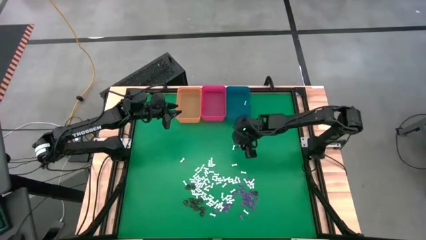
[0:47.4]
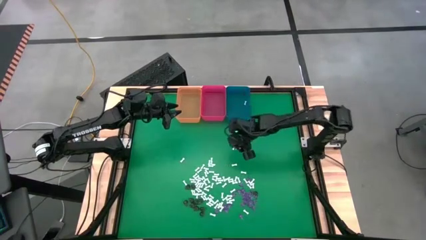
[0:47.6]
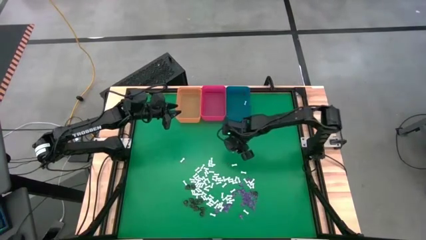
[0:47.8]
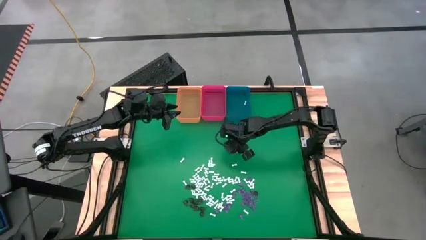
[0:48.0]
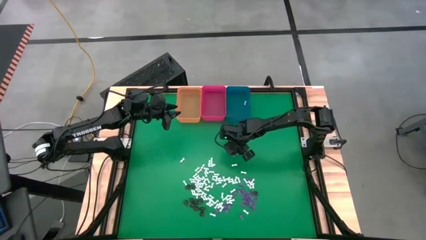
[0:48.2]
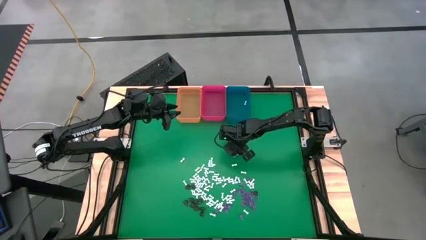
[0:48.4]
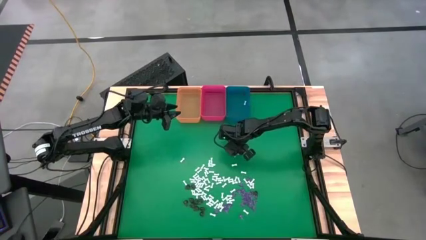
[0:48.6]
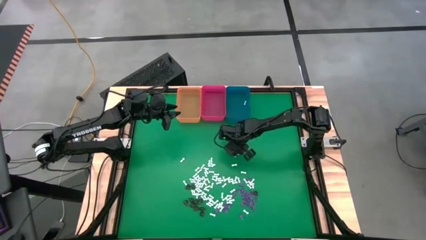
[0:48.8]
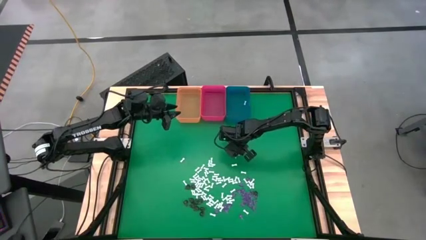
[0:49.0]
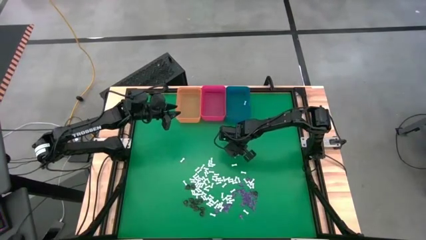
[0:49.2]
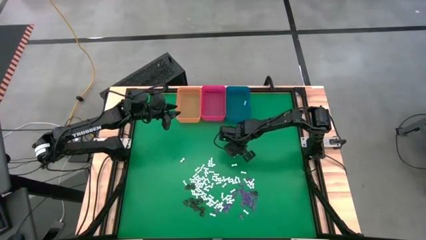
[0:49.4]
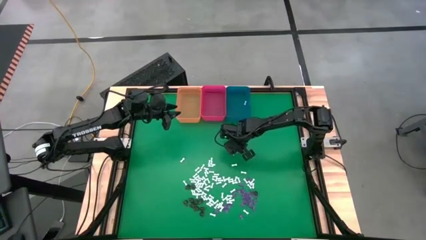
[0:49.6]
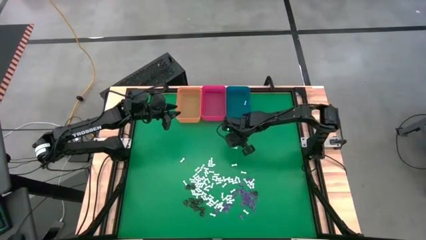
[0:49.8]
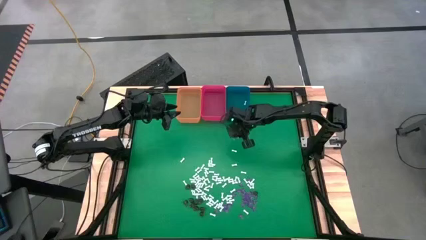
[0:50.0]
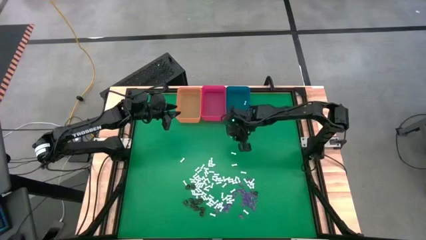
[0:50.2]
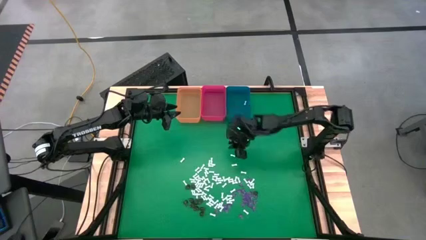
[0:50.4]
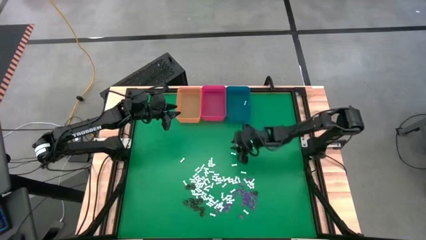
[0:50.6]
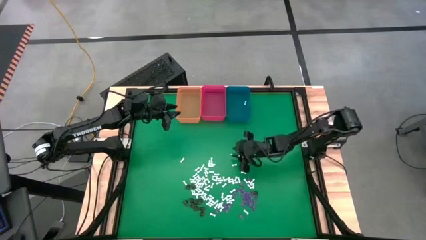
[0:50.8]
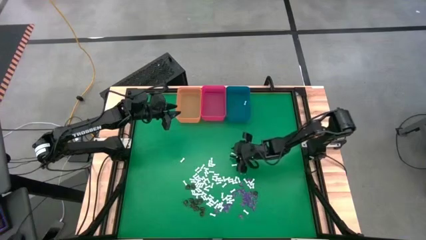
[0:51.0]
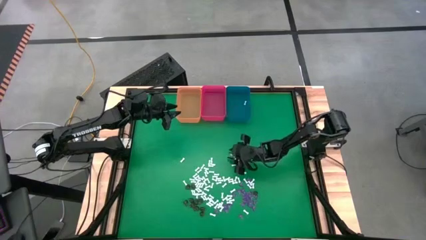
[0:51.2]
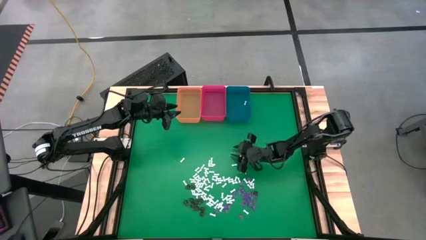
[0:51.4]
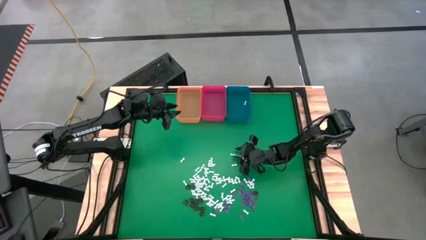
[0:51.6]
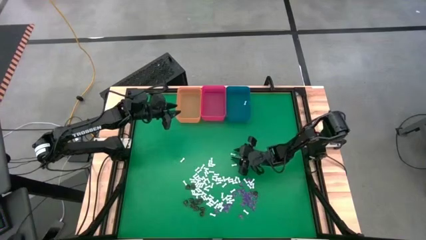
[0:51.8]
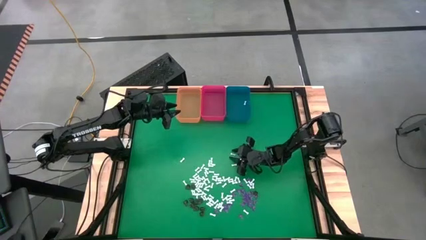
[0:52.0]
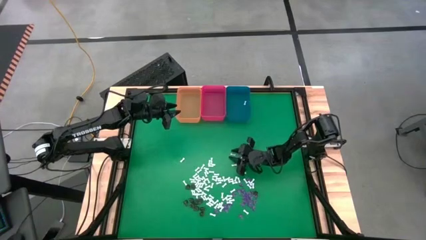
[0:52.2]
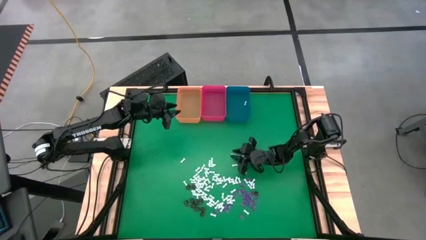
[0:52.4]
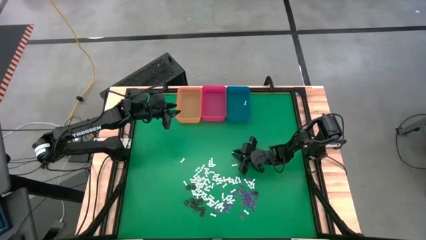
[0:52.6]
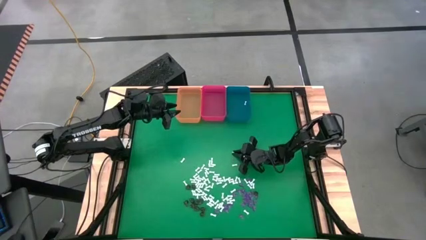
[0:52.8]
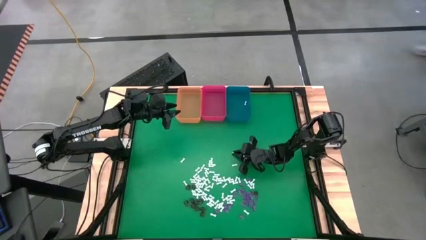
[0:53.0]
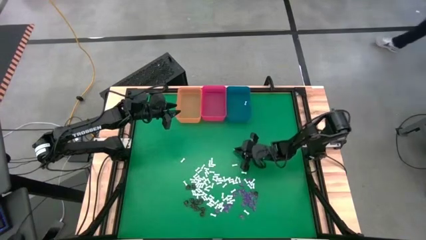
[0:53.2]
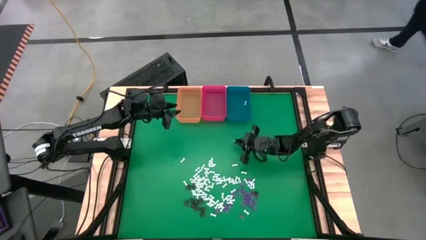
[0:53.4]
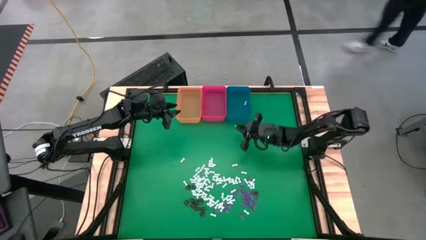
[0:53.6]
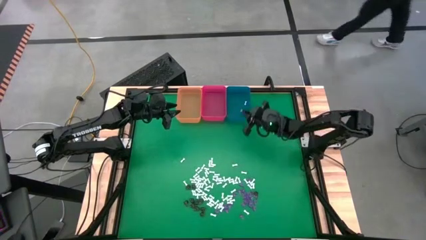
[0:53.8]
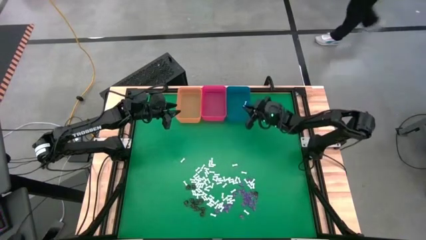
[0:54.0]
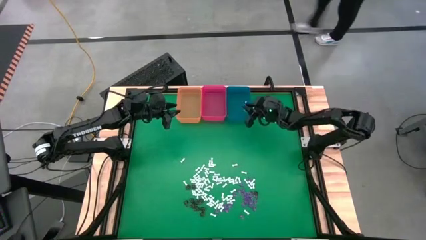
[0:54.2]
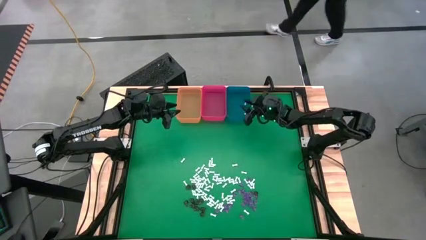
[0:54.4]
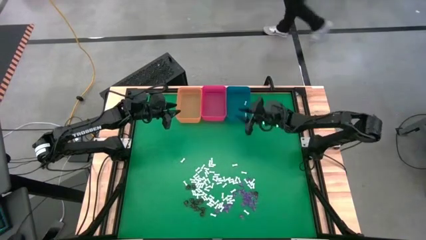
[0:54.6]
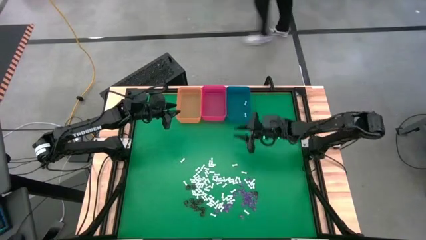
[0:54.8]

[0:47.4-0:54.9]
Task: Sort Halloween decoration
Put the white bone toy into the blue bin

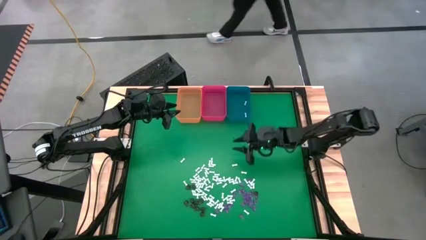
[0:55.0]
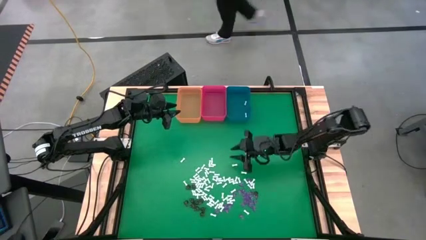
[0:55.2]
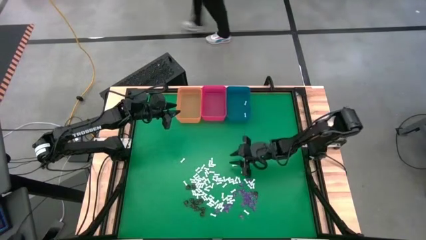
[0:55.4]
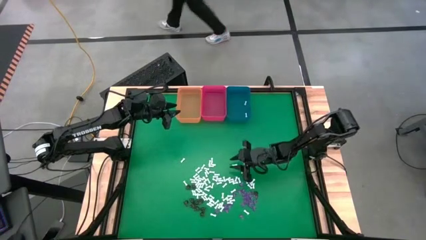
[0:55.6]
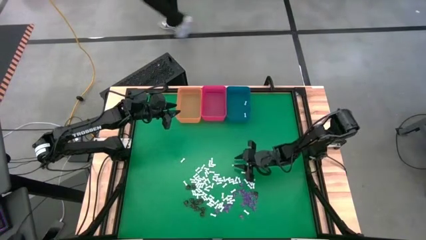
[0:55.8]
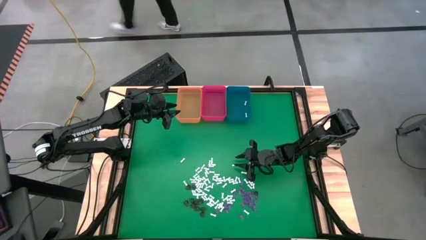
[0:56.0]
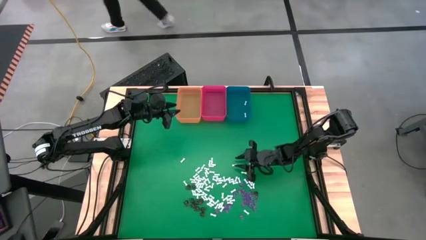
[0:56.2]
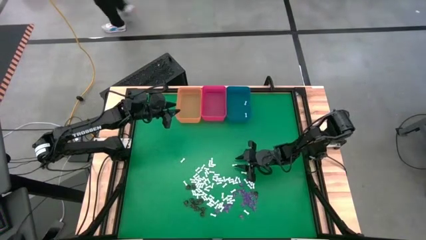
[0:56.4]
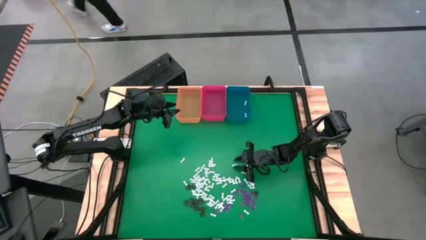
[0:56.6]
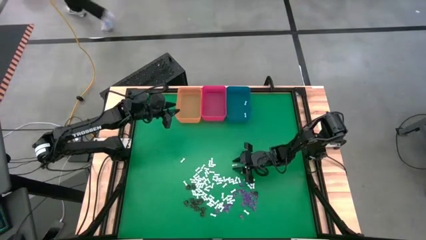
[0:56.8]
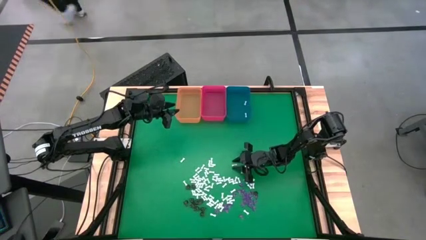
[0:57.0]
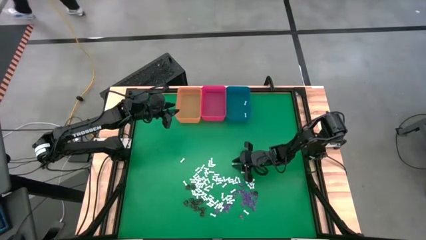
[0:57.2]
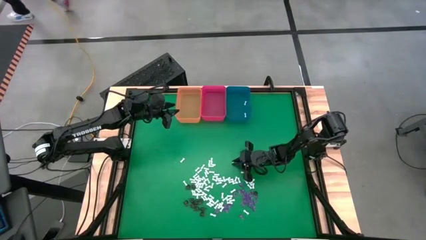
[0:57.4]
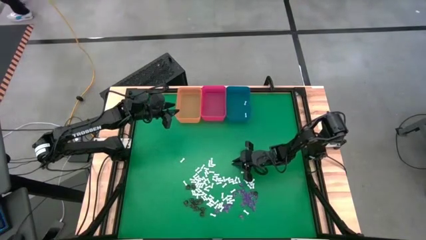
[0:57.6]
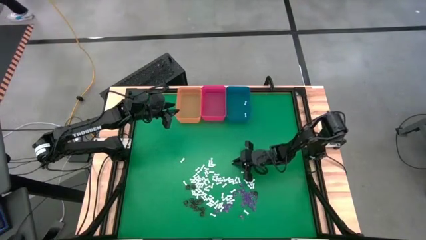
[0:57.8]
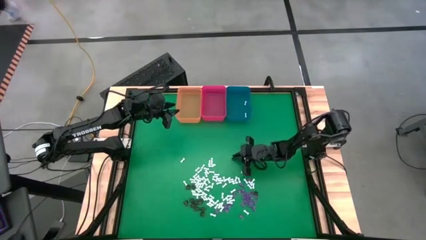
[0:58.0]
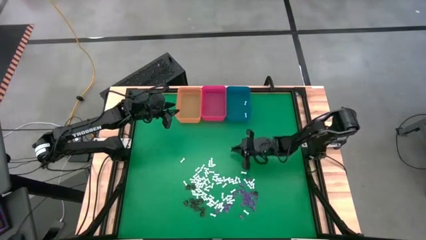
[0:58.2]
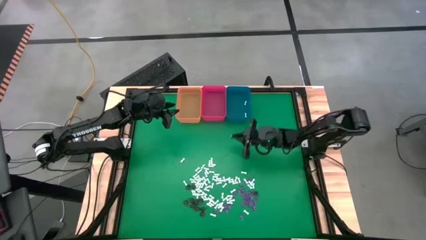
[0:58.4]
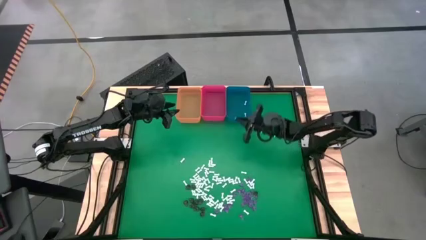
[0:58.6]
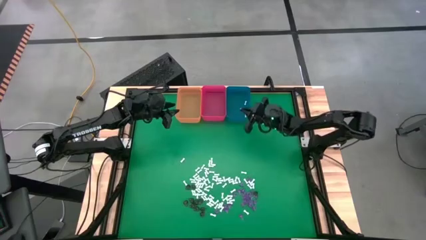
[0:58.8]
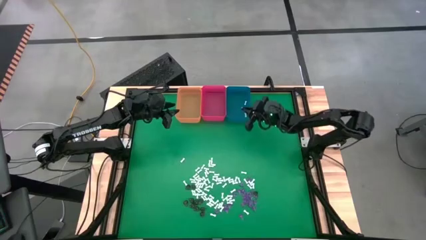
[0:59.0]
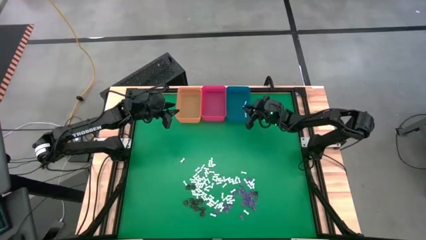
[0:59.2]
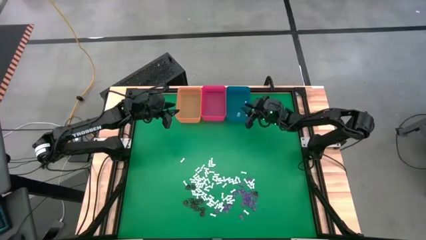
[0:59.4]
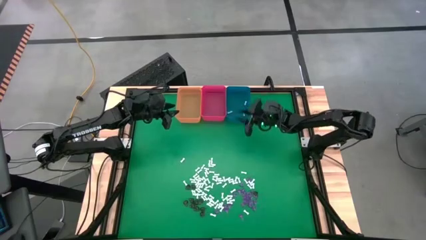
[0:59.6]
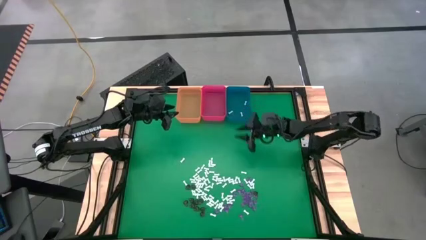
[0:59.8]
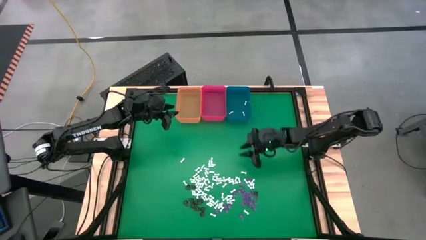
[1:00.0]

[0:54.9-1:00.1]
Put the white bone toy into the blue bin

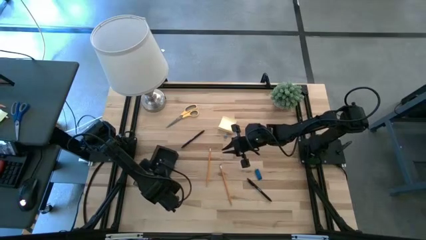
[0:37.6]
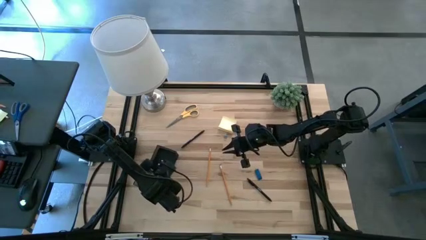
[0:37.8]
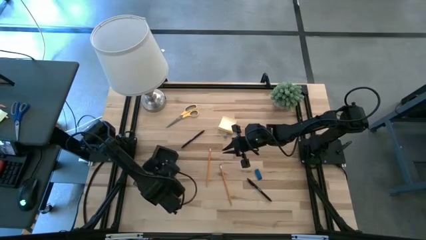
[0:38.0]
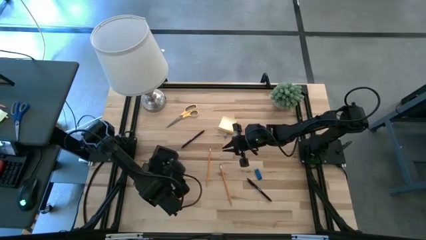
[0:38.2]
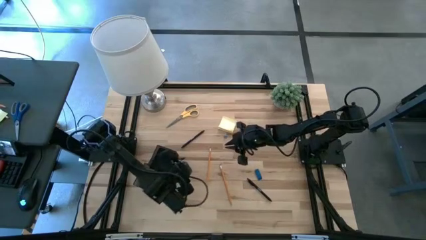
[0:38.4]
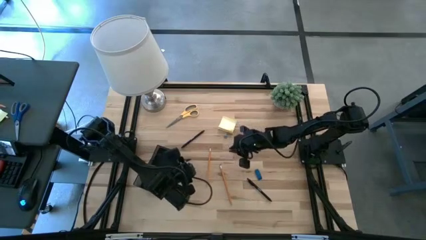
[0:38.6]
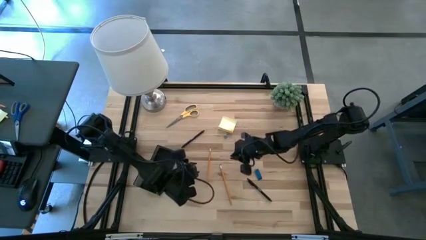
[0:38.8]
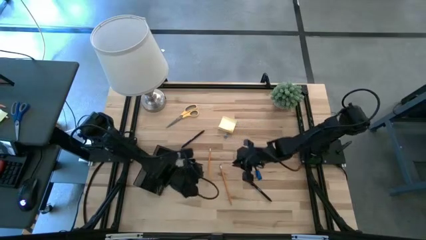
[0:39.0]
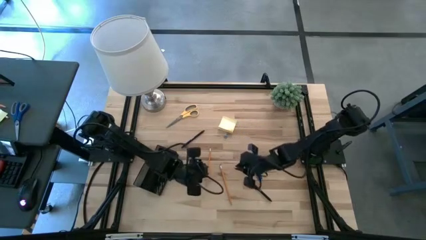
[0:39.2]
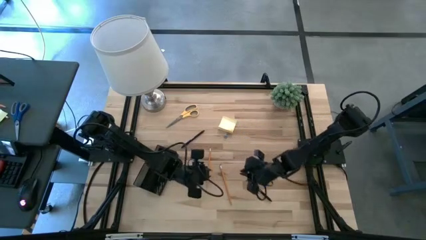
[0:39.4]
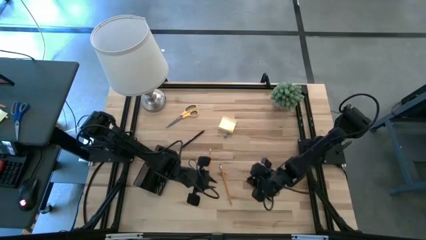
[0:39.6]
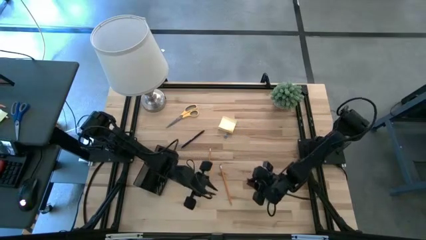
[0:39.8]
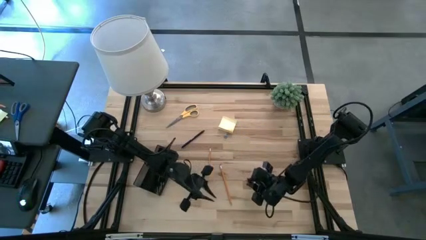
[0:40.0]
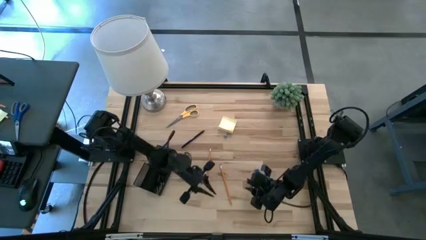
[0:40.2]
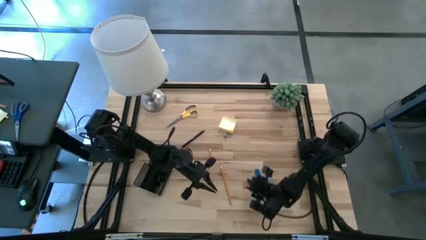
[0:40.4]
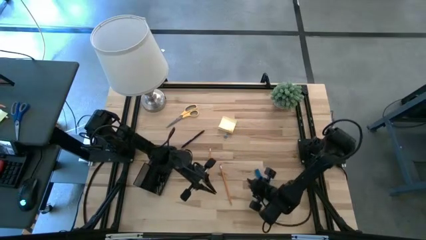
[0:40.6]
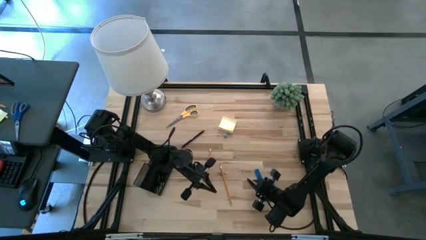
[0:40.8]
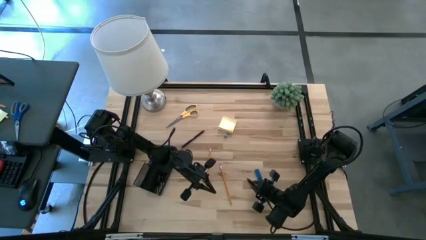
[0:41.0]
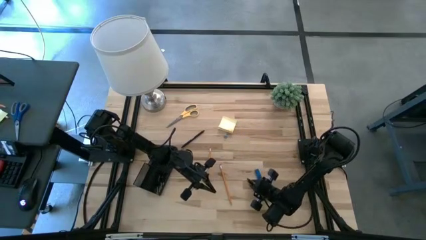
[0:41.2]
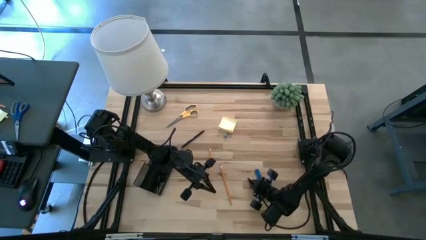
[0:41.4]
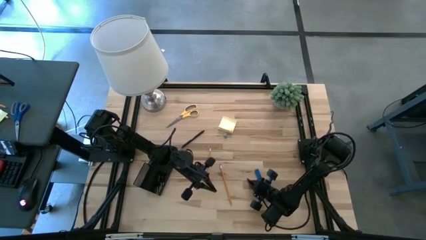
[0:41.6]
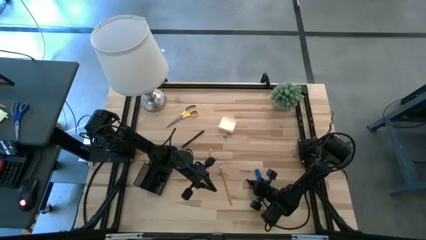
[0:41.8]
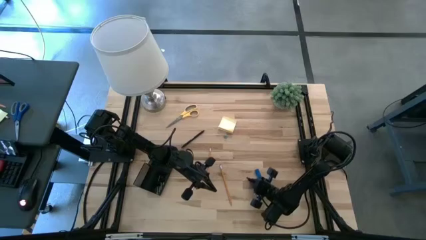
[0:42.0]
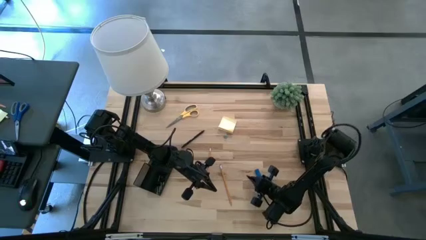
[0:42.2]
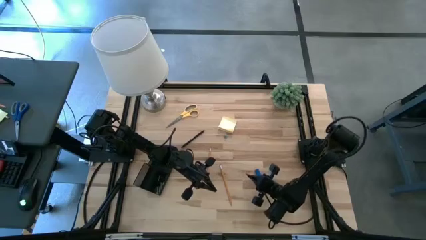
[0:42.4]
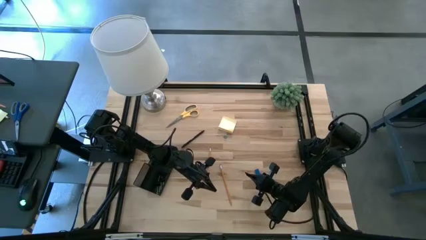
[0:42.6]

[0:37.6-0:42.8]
Task: Pick and place office supplies into organizer
Put the bottom black pen into the black desk organizer
